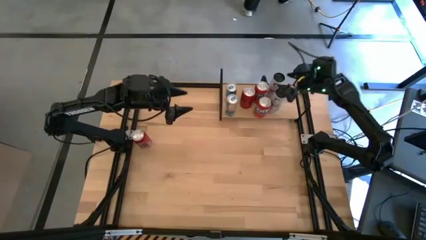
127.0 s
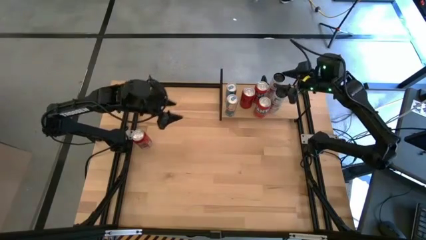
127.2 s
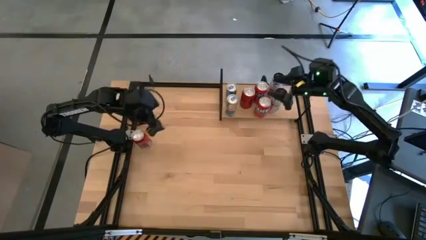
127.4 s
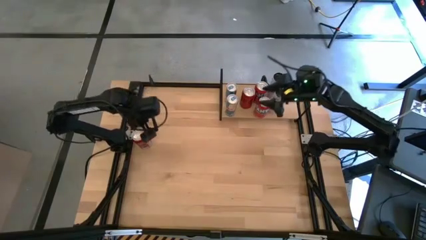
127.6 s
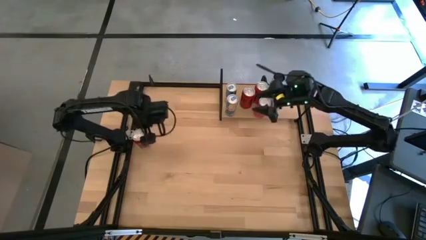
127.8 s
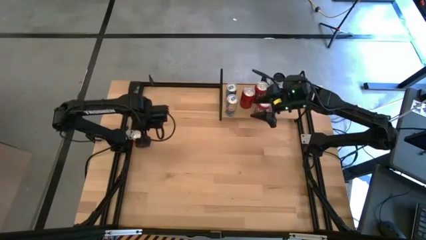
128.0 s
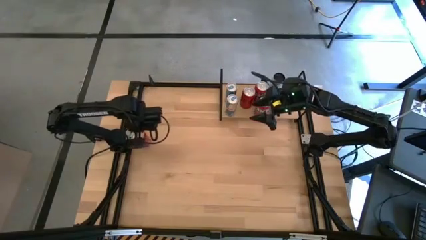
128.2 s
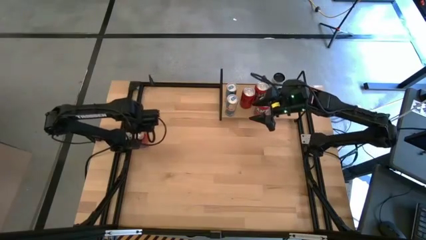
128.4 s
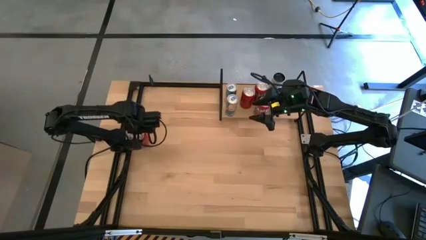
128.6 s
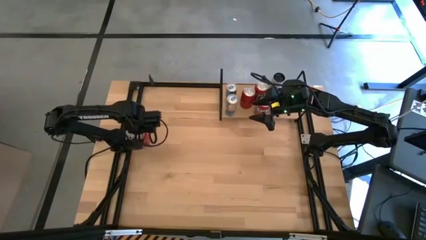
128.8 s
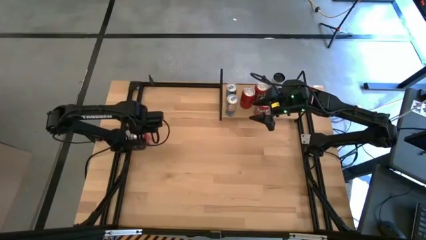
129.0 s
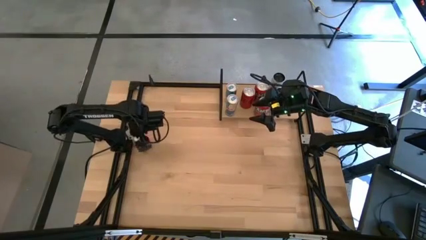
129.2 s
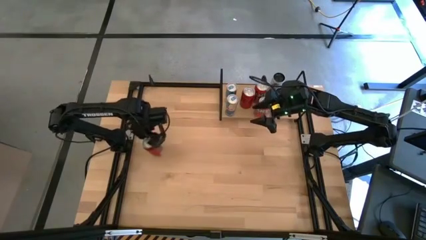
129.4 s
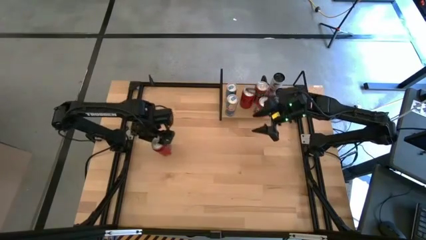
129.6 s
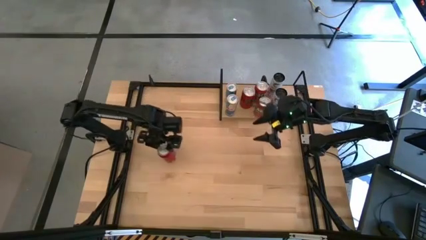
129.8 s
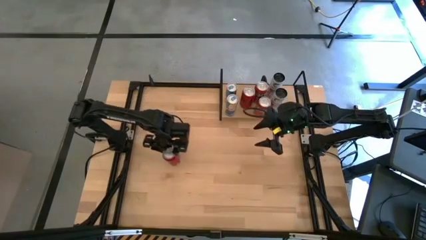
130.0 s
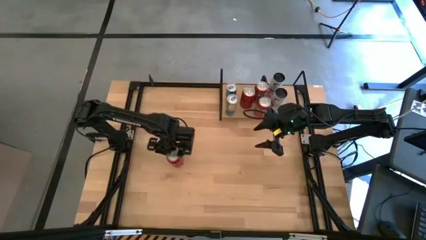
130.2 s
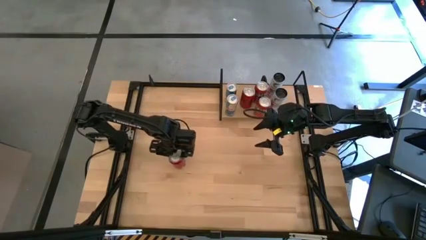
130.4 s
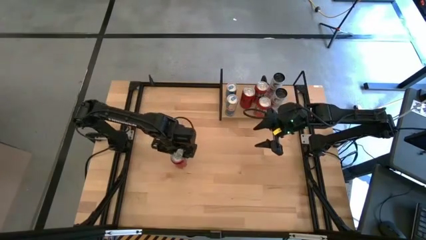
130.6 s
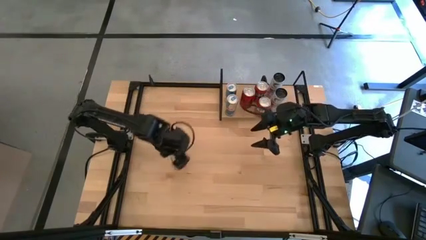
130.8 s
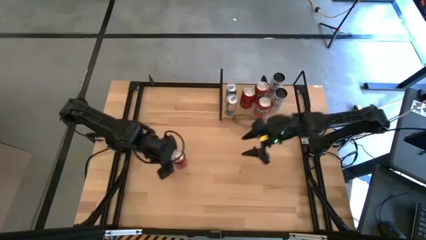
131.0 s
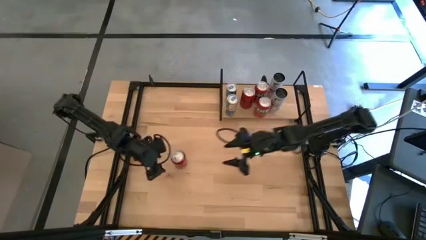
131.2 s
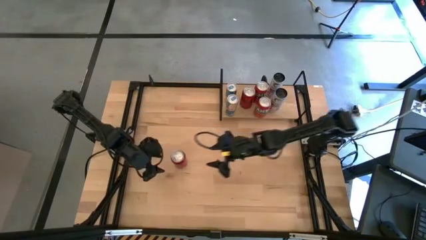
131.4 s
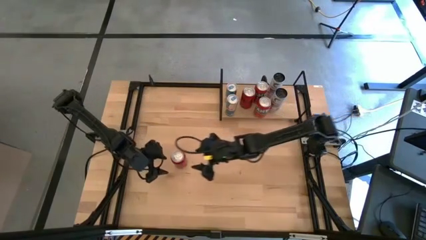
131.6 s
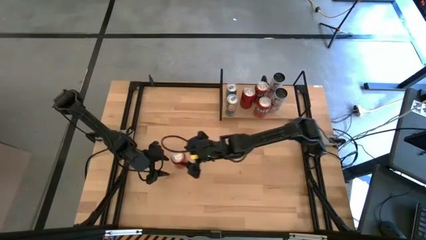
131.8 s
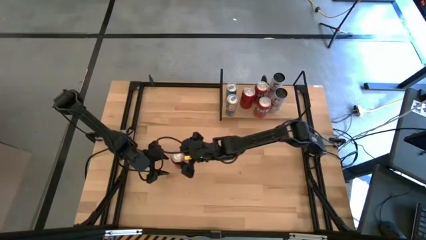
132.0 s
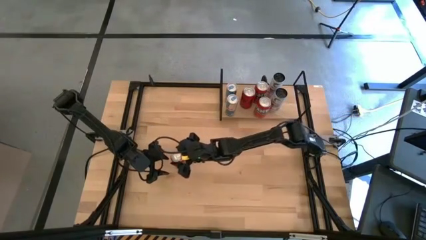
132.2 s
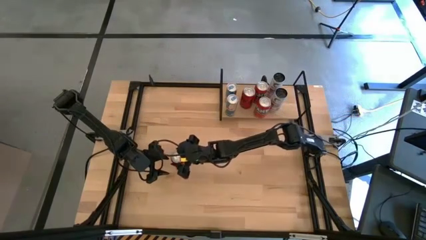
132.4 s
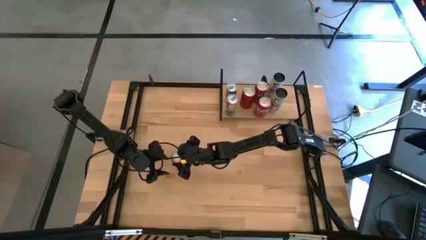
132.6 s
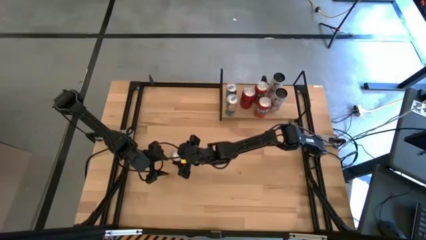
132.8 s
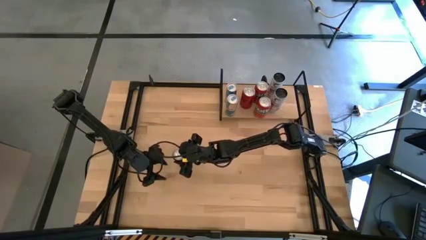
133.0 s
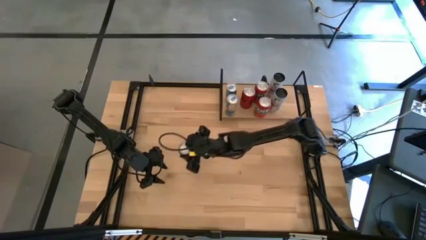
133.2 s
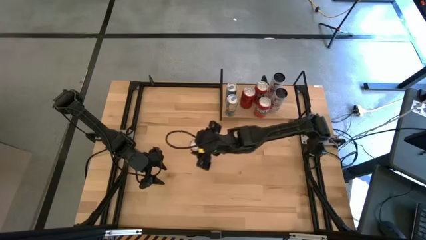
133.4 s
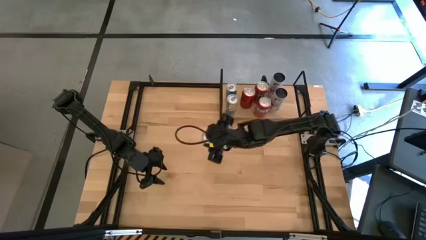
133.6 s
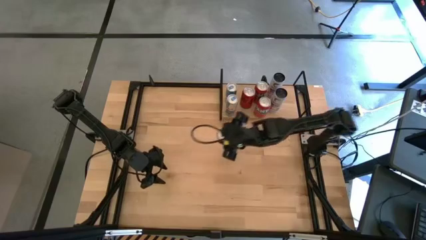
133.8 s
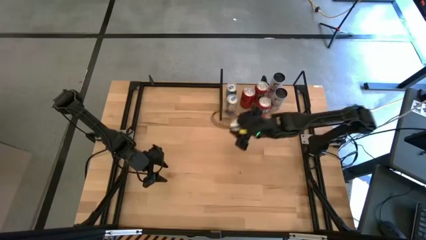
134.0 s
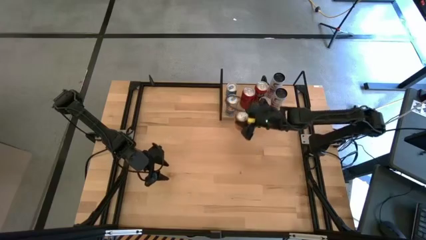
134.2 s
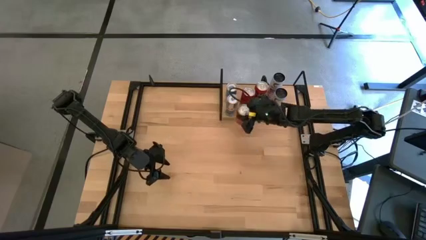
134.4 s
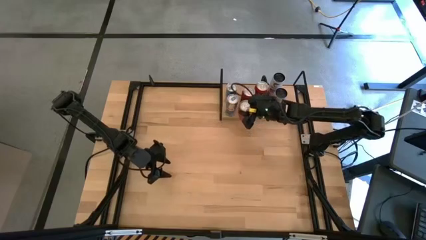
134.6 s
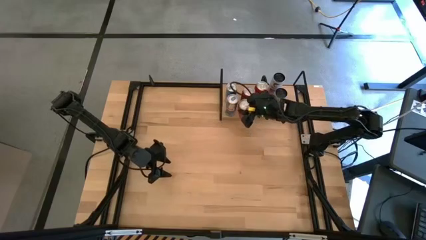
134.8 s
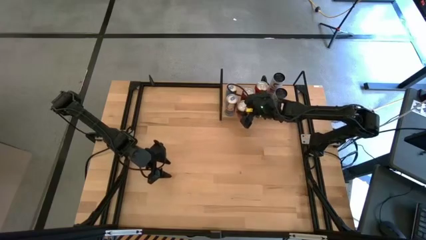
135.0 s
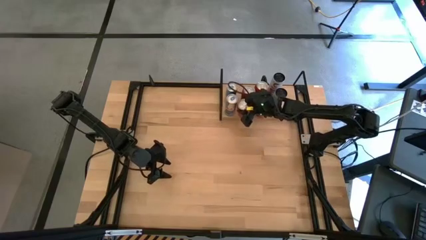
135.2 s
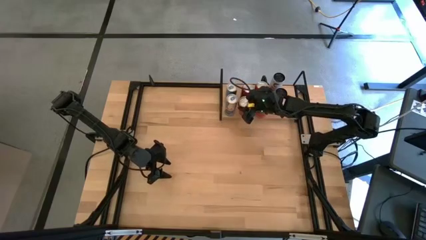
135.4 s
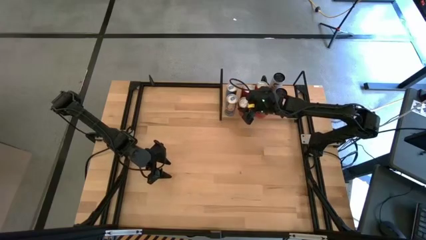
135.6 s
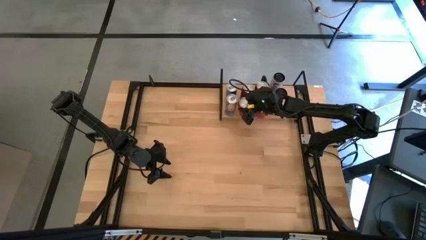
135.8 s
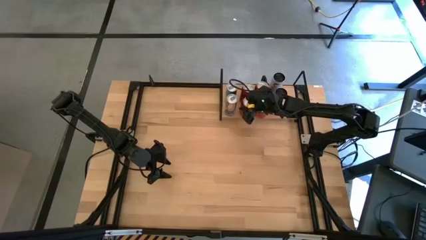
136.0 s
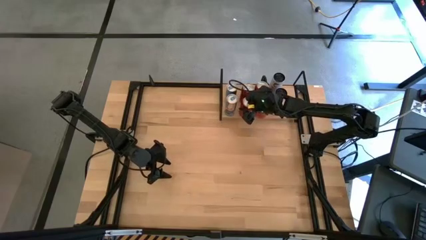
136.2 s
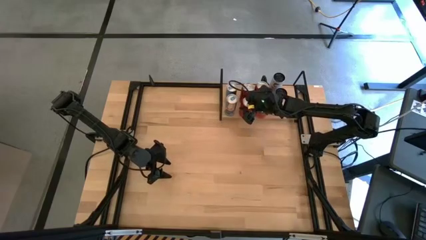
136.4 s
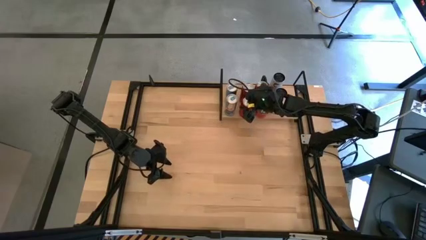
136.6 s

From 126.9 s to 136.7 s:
Task: Place canned beverage on shelf
Put the red-black soda can on the shelf aligned with the other red-black soda can

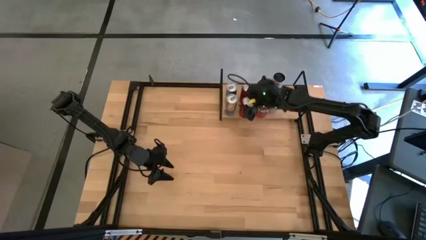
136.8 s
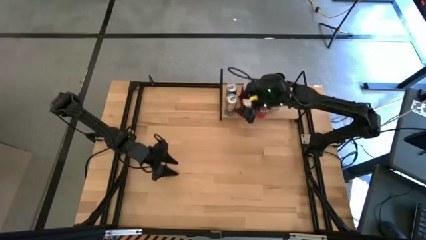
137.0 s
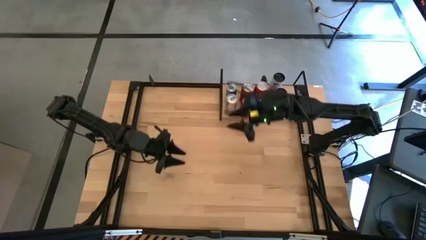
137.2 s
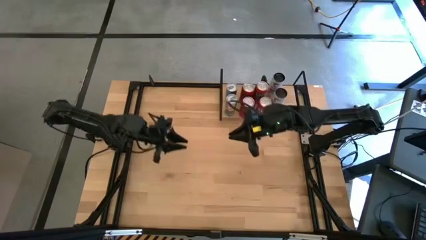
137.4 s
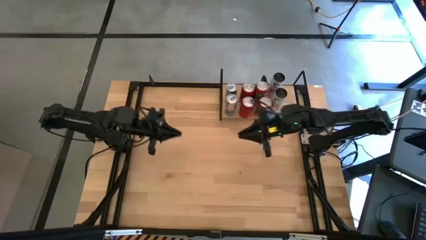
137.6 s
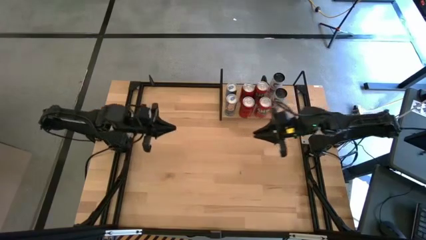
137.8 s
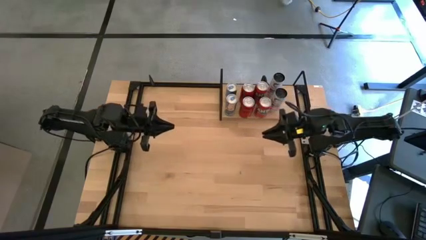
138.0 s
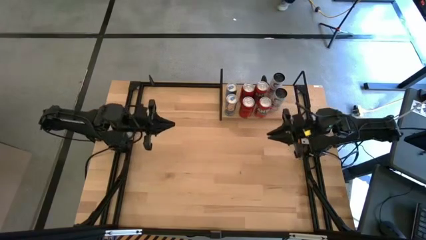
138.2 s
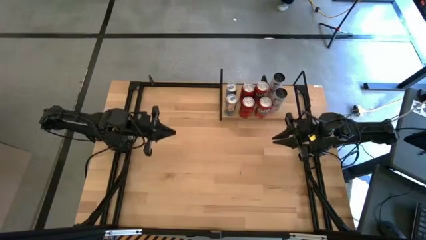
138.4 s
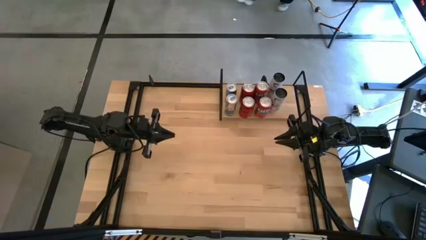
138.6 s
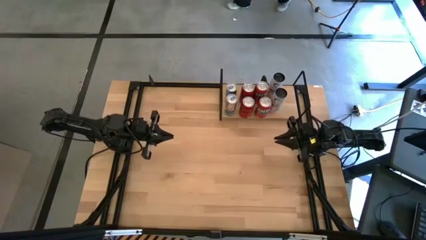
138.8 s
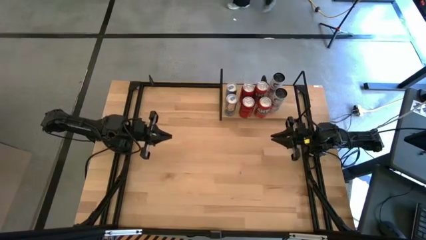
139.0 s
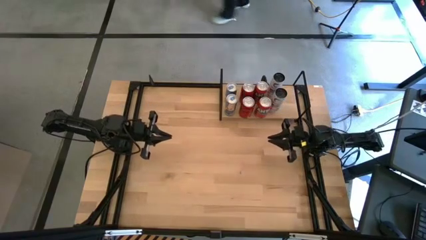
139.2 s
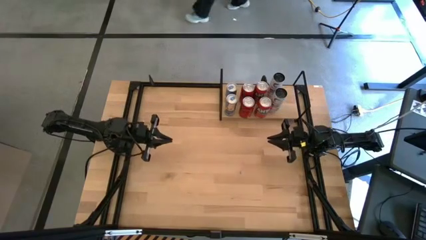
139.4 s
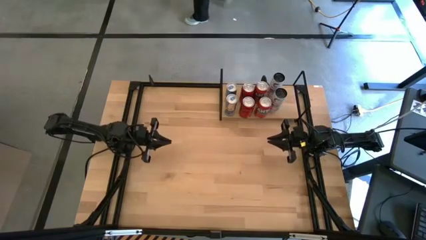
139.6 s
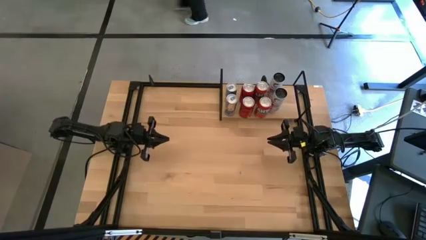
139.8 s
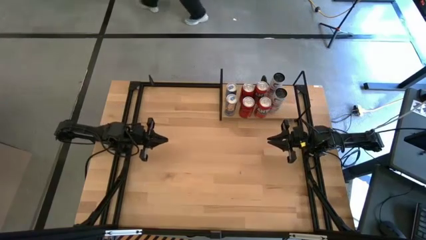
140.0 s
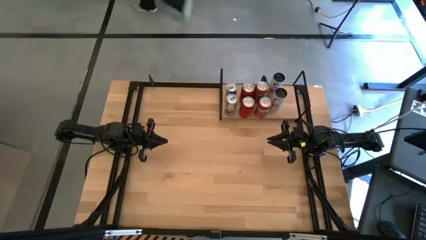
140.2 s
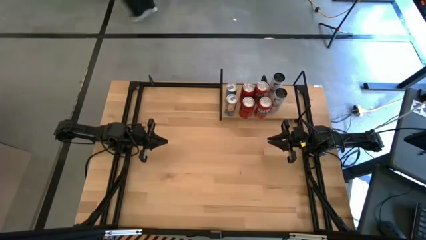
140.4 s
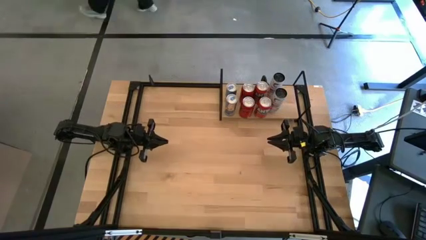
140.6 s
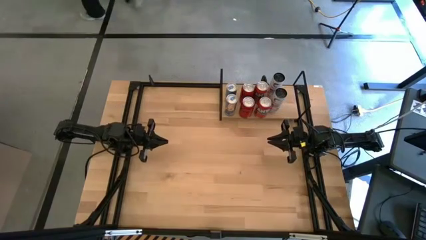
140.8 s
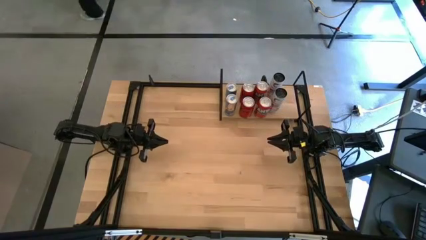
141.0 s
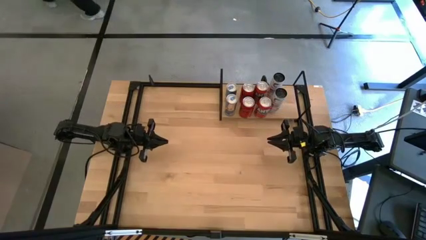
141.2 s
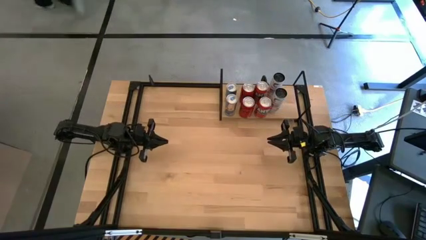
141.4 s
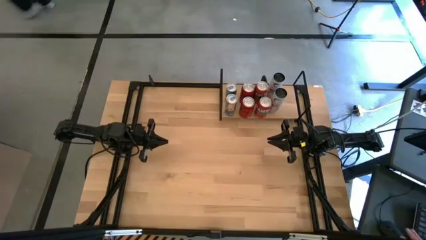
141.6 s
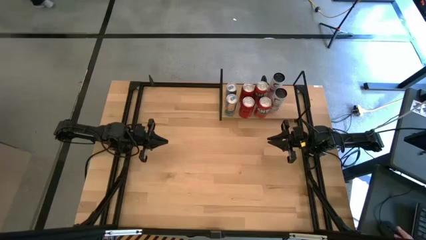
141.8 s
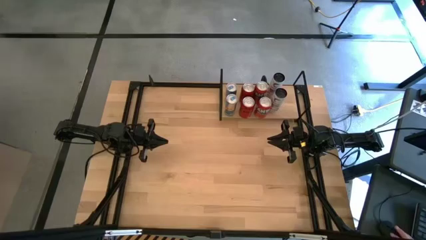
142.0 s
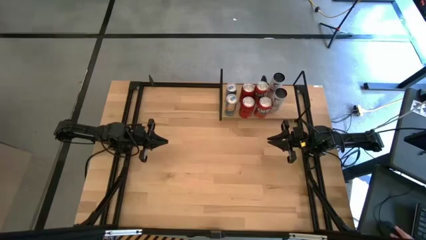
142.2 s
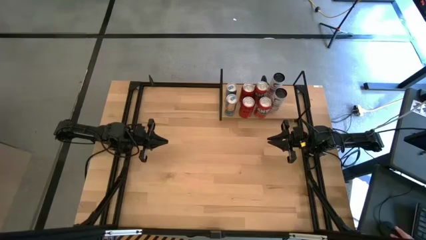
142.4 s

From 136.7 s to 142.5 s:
Return to Home Position
